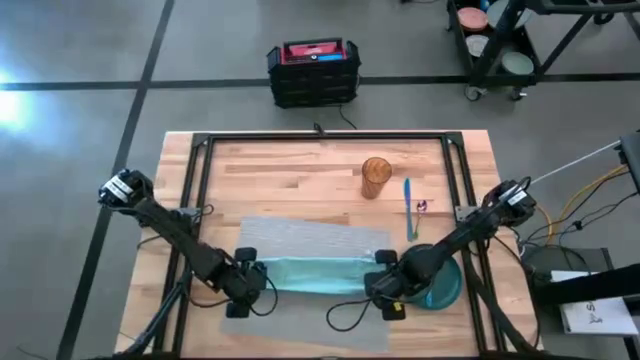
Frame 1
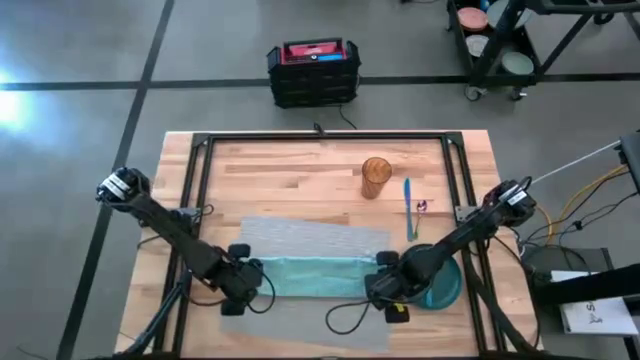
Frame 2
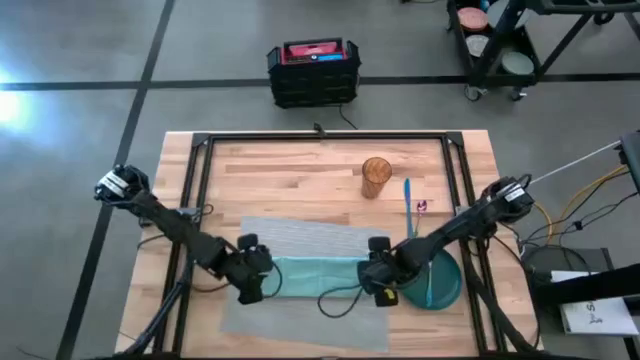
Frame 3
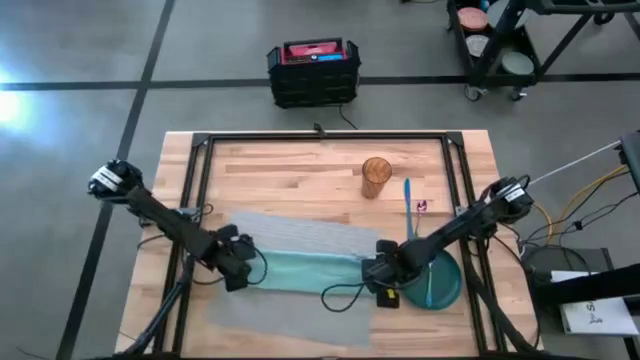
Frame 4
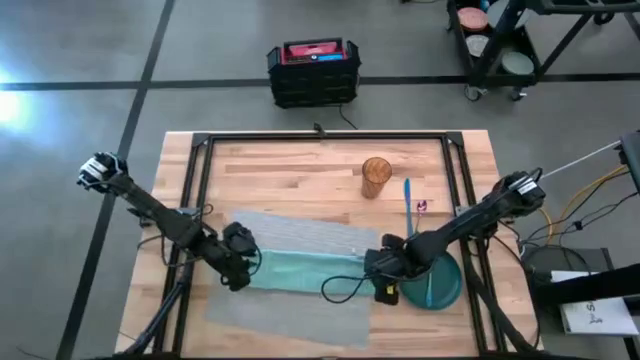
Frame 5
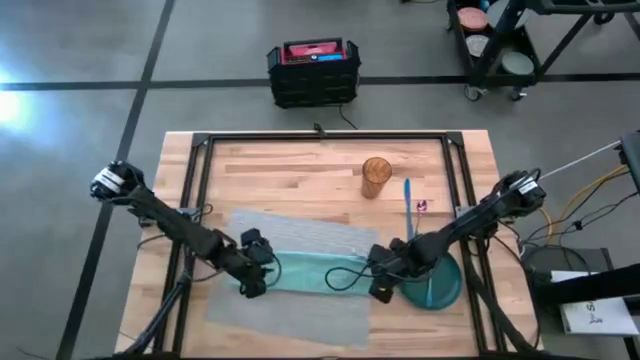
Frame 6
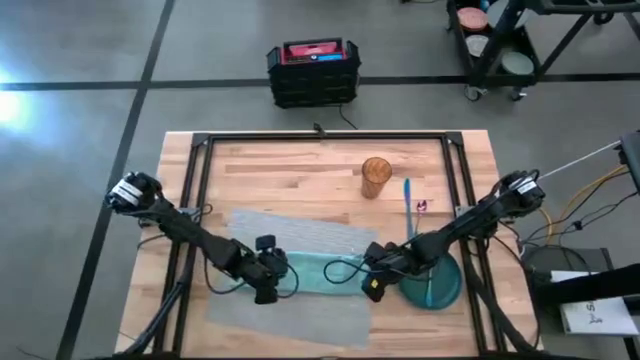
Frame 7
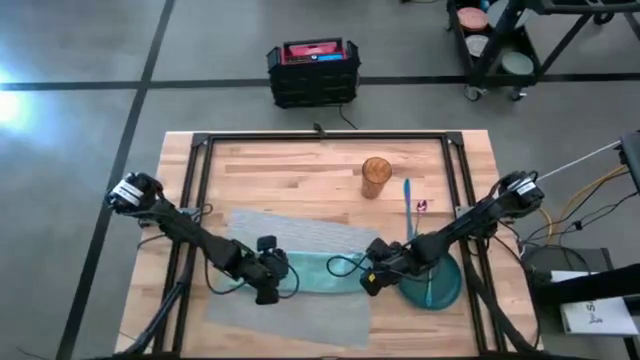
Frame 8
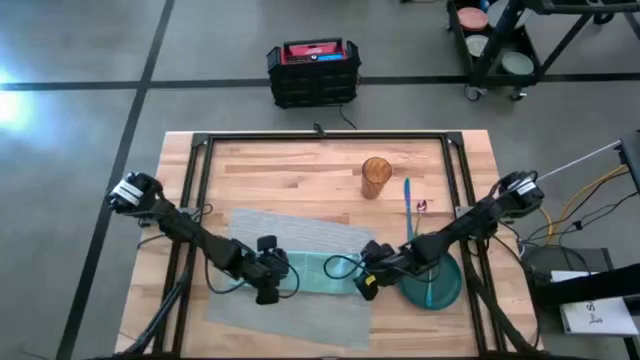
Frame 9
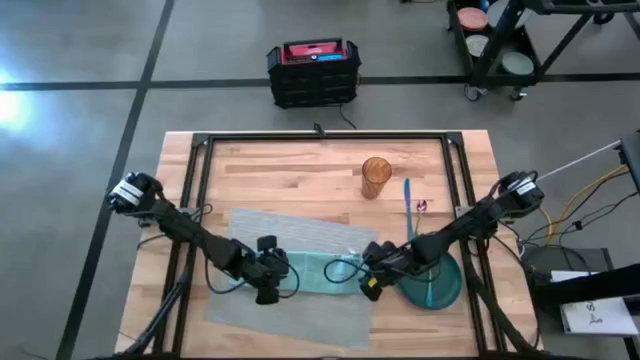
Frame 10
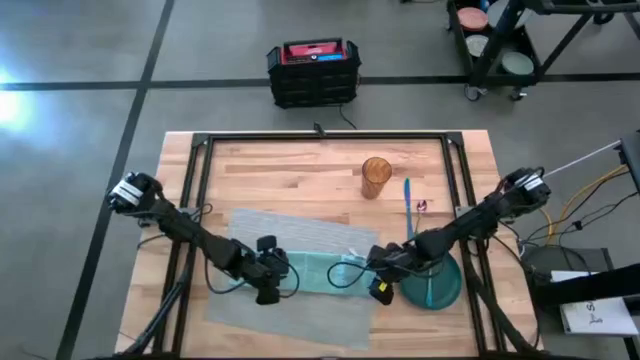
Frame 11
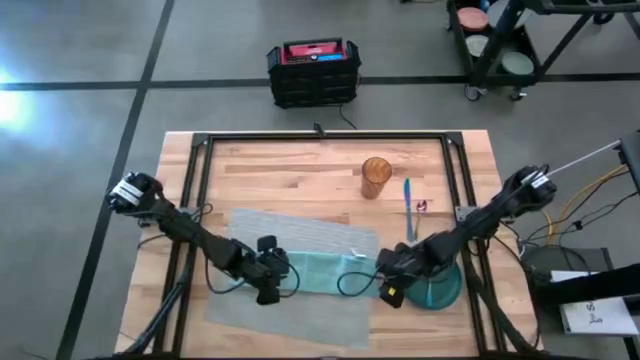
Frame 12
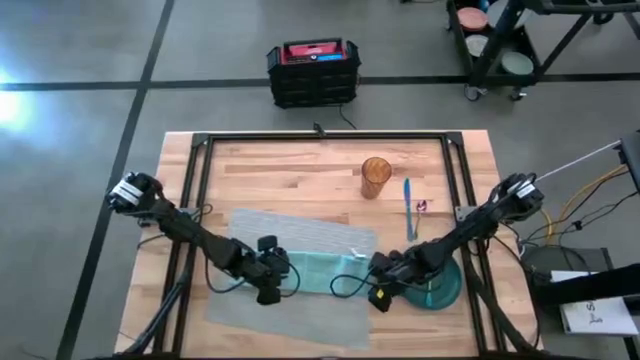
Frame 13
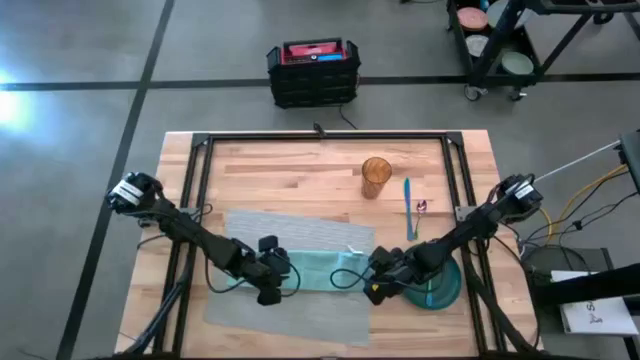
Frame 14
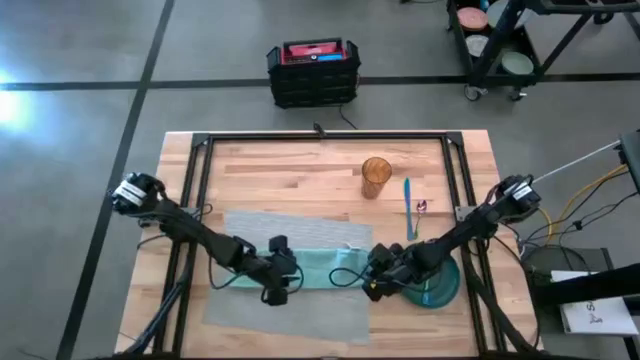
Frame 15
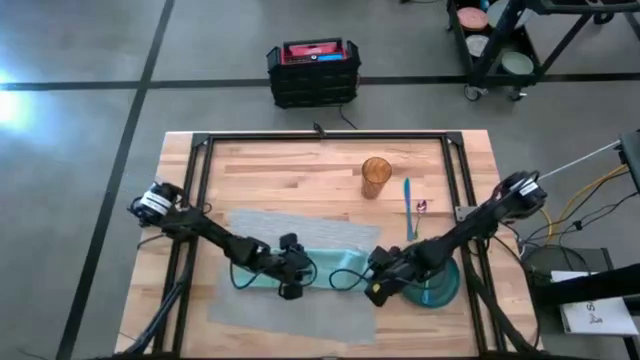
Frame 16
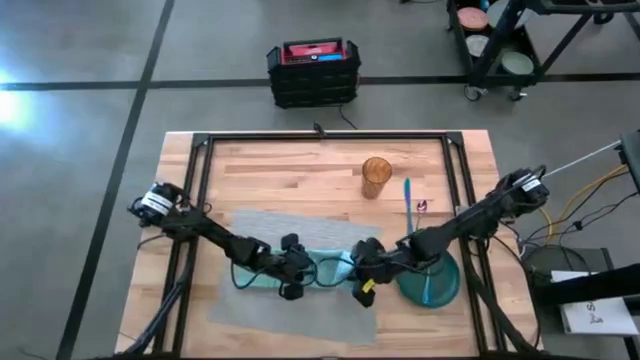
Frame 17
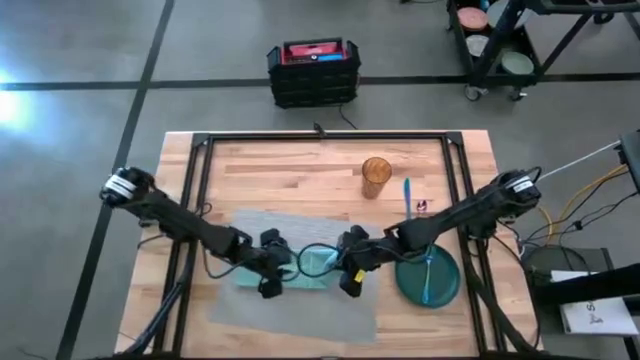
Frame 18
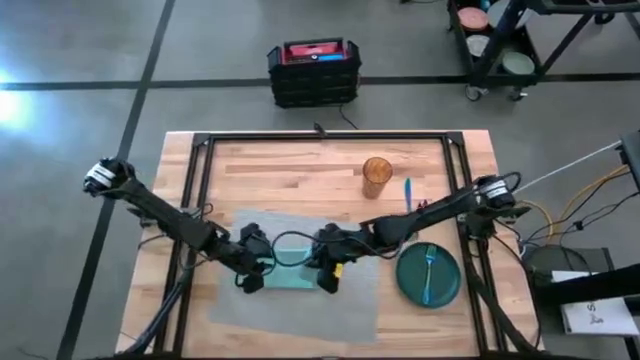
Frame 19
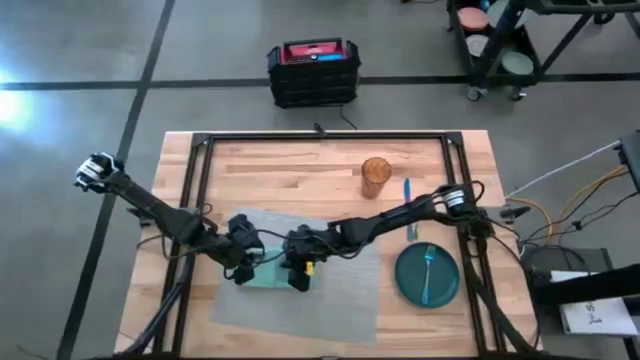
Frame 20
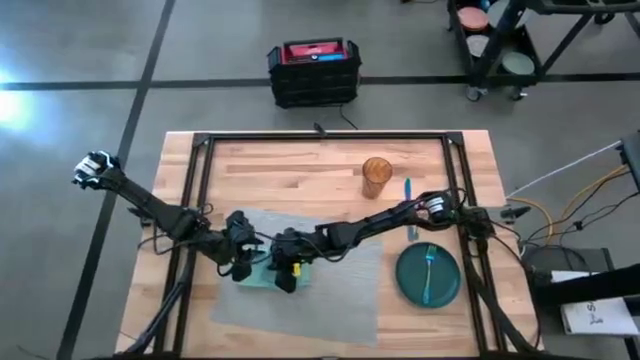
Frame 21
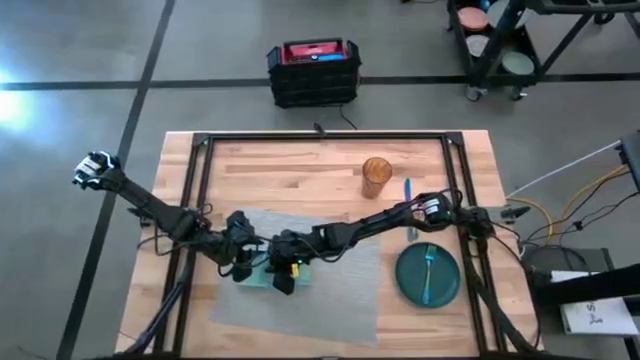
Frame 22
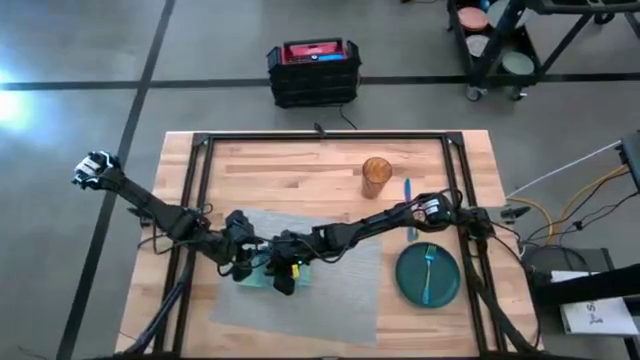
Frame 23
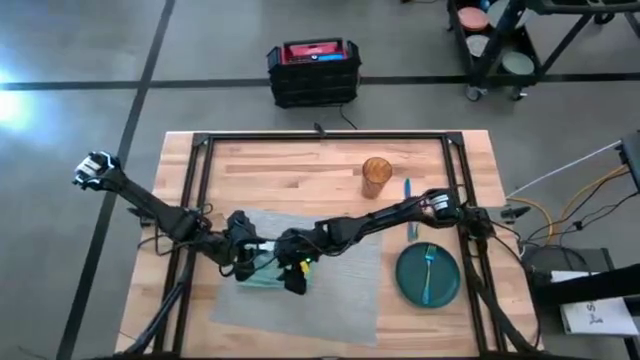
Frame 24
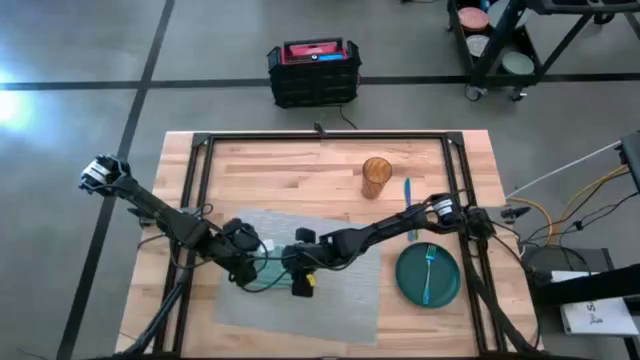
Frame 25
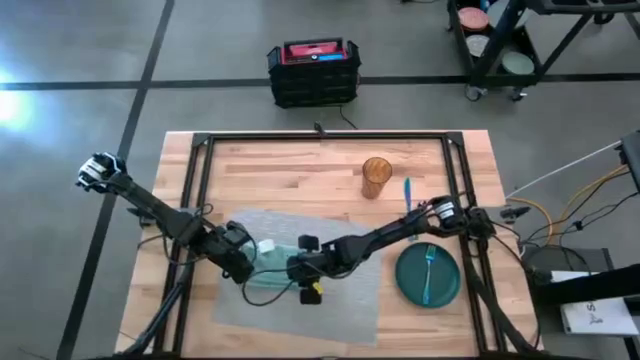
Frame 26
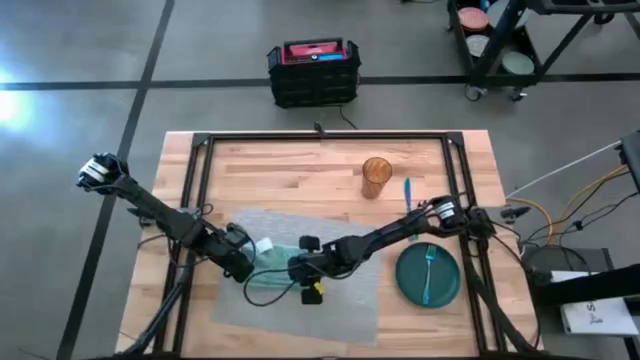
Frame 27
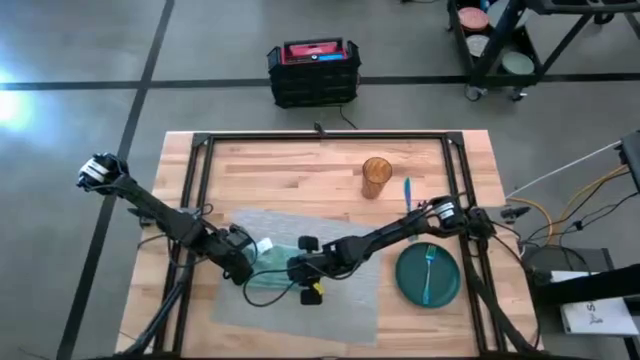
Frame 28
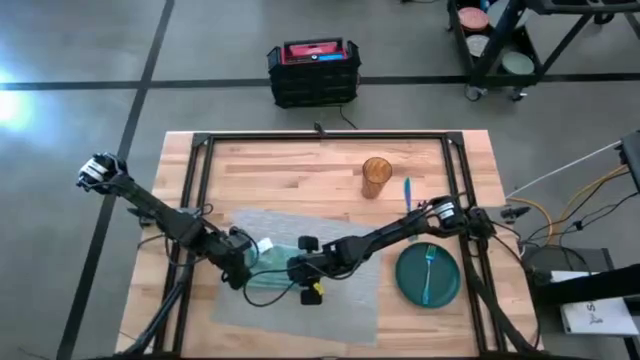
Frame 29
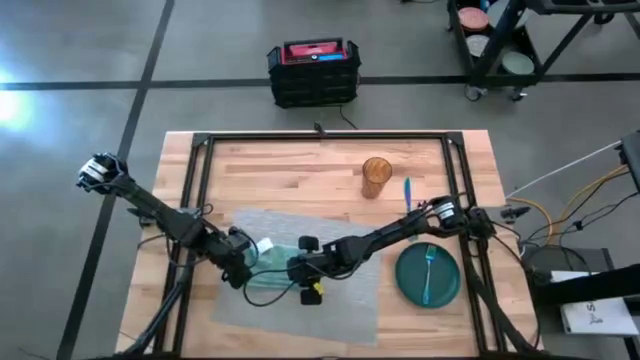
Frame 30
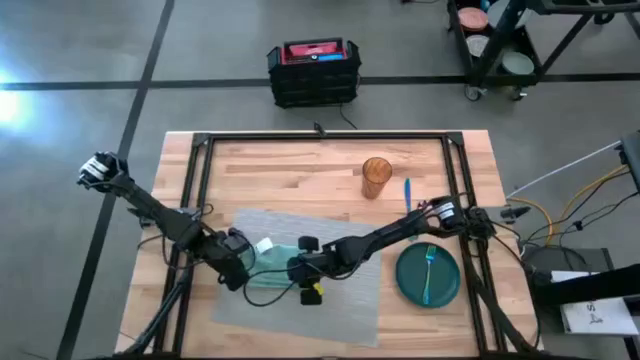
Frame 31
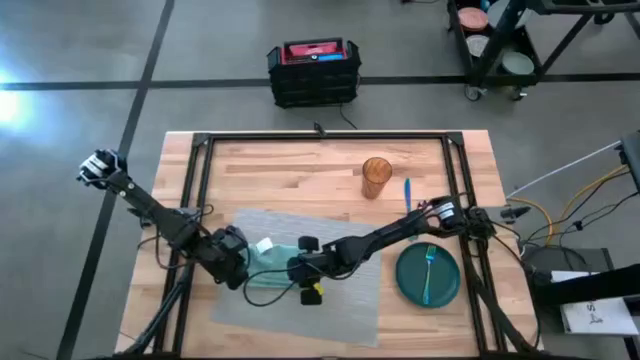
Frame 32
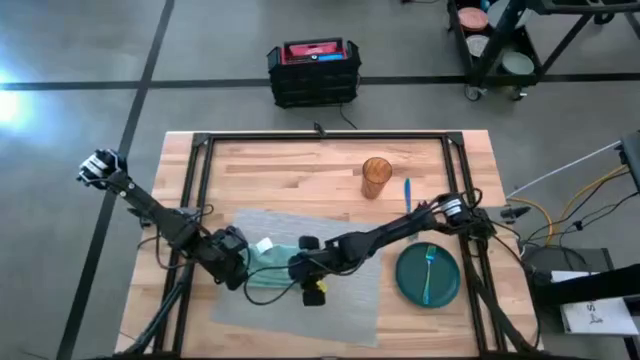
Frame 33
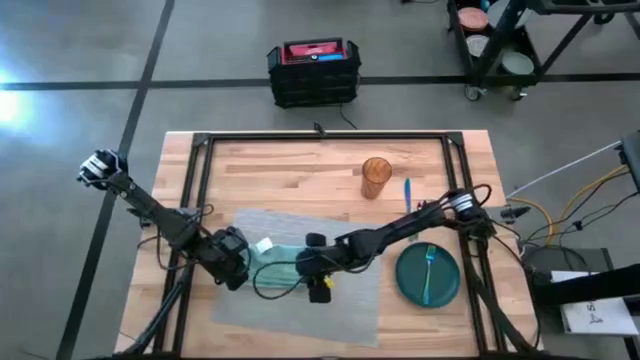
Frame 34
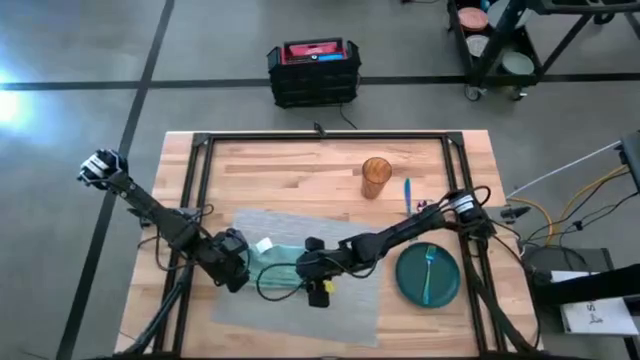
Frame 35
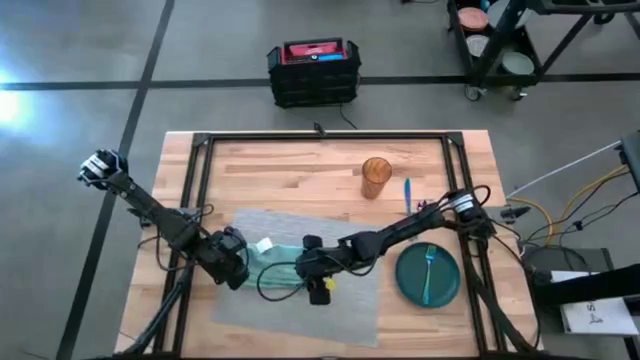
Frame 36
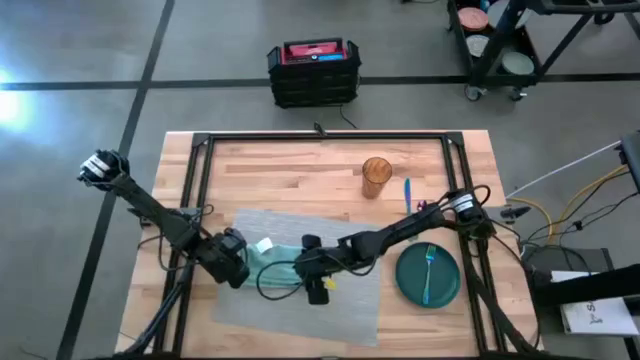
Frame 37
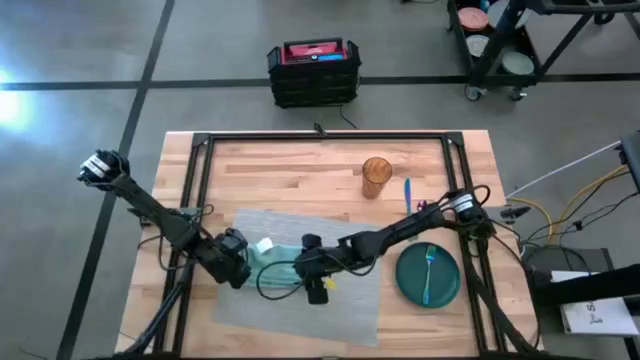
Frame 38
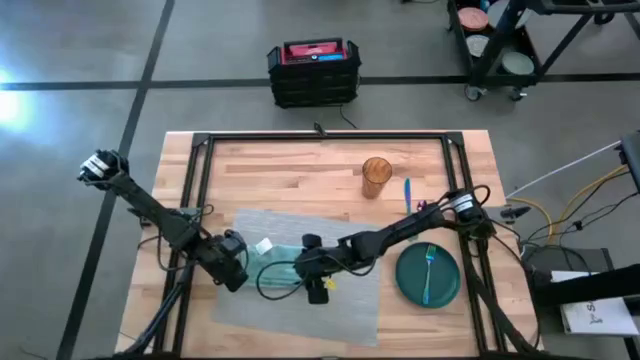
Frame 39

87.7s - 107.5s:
Task: Set table place
Fold the blue table napkin

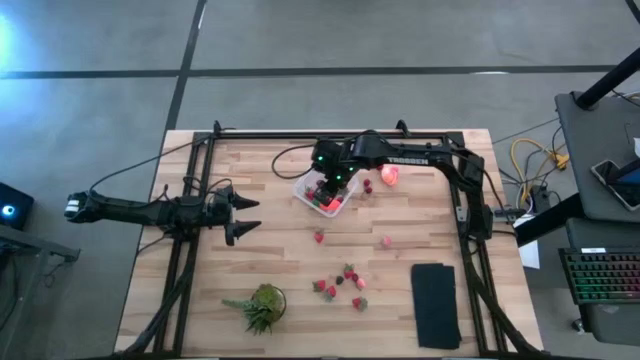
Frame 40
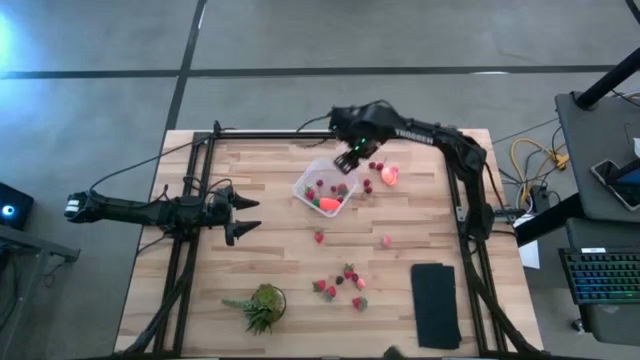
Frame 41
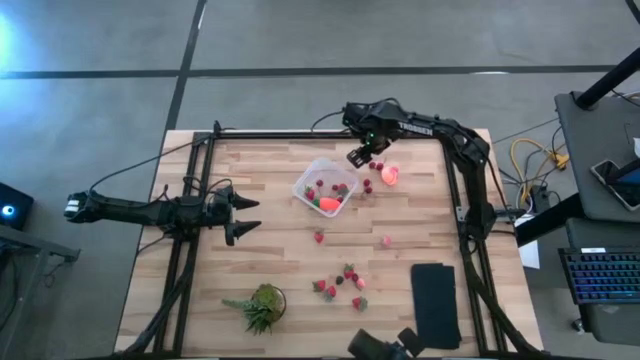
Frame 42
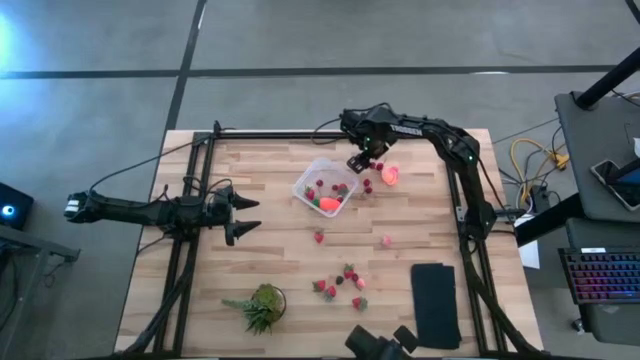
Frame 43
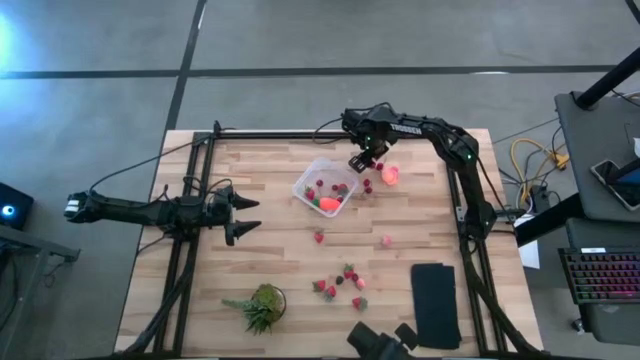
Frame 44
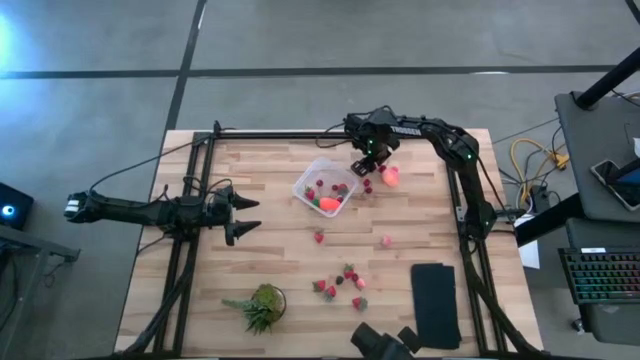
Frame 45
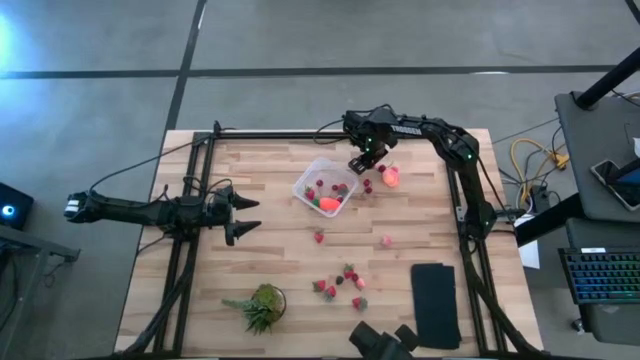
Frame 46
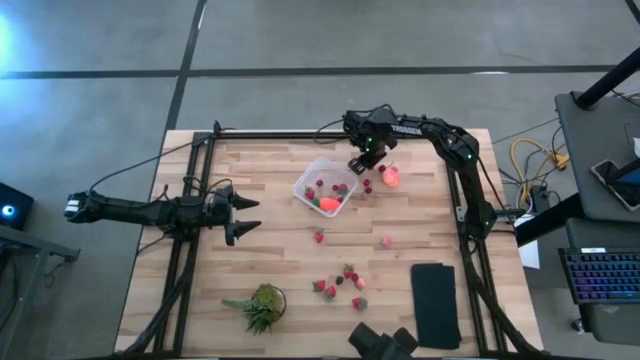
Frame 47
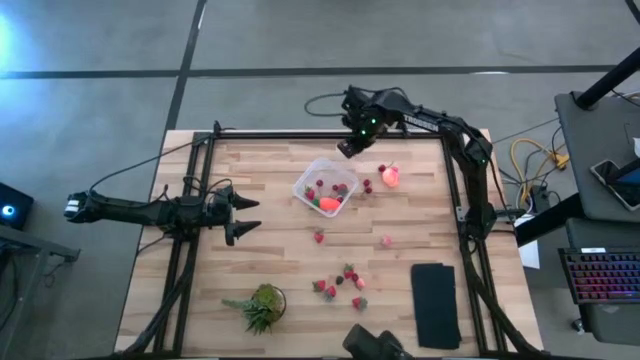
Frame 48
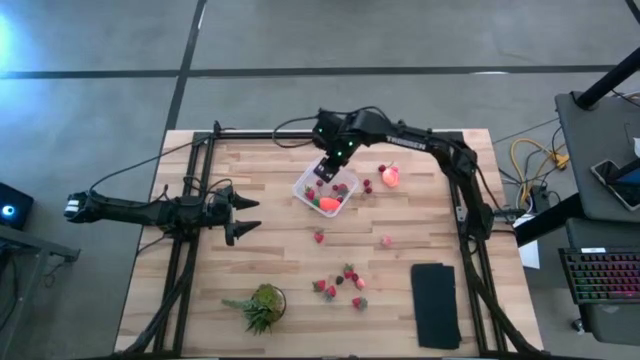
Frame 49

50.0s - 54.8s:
Task: Pick and placing Produce into tupperware
Put the red cherry into the transparent bin
